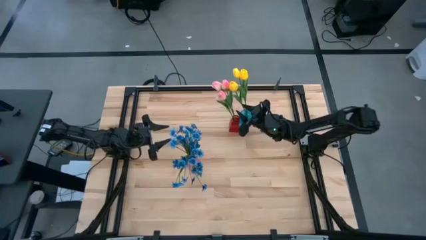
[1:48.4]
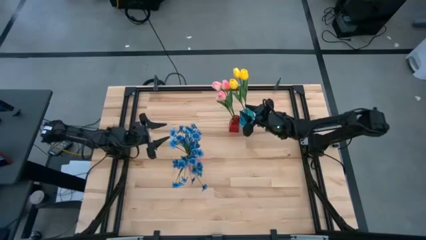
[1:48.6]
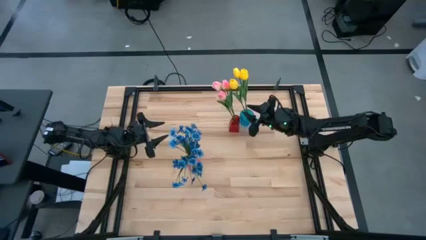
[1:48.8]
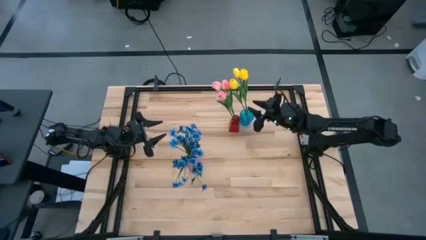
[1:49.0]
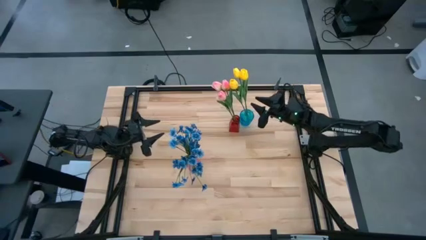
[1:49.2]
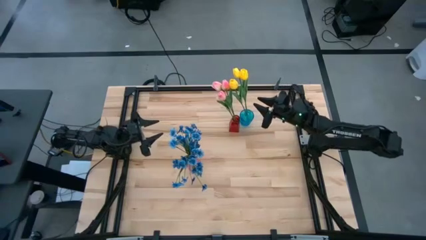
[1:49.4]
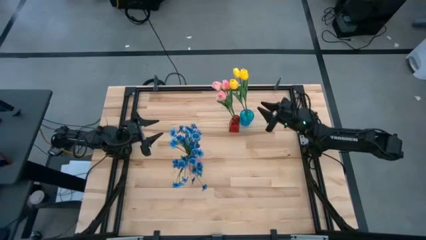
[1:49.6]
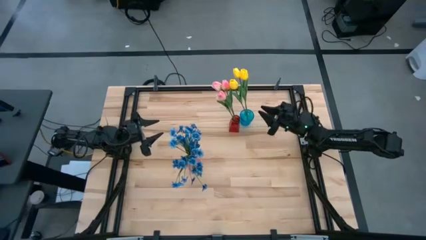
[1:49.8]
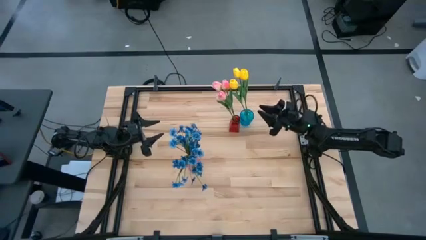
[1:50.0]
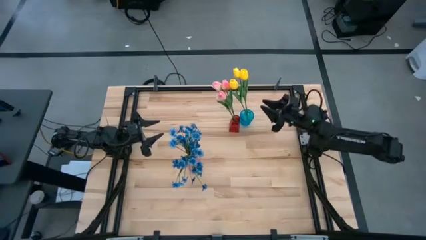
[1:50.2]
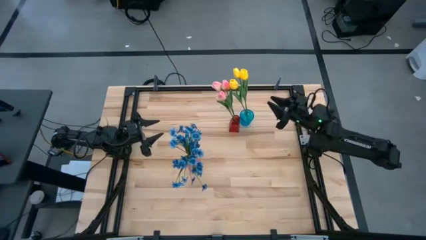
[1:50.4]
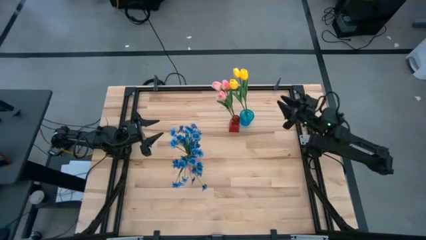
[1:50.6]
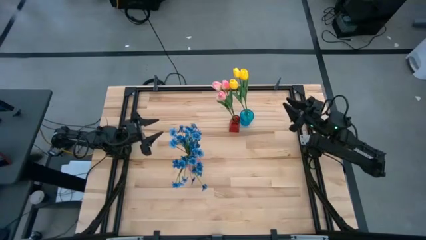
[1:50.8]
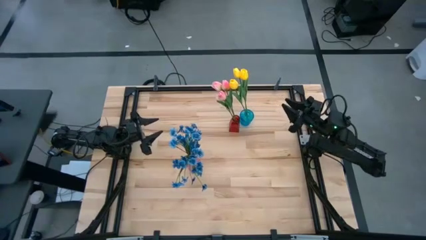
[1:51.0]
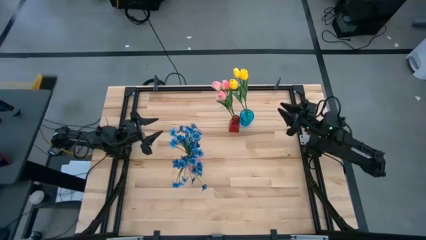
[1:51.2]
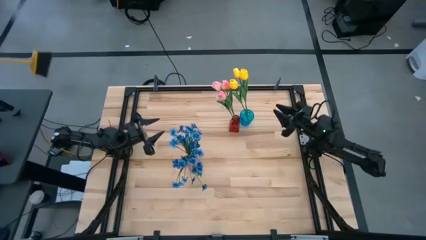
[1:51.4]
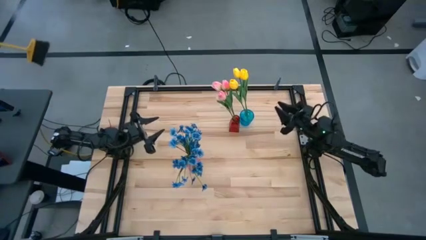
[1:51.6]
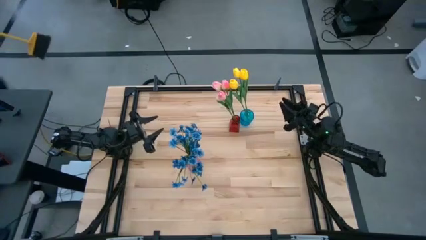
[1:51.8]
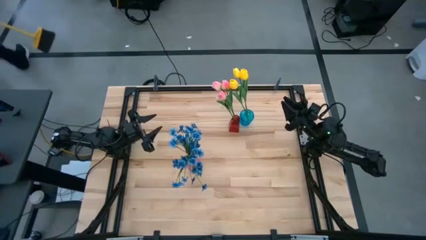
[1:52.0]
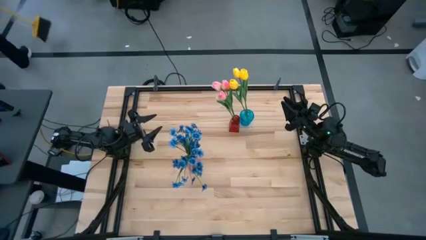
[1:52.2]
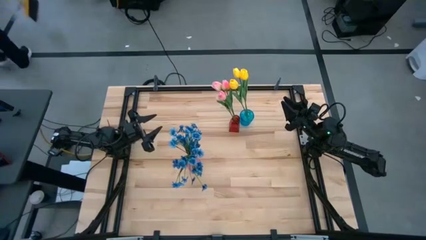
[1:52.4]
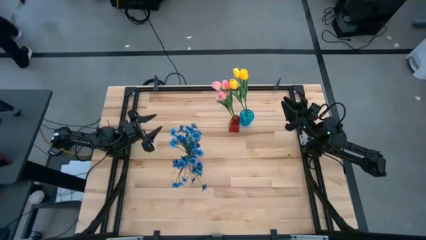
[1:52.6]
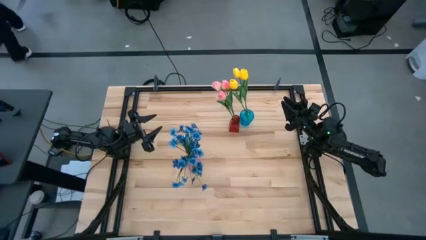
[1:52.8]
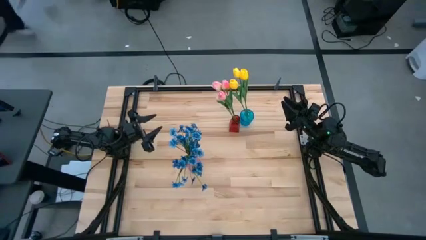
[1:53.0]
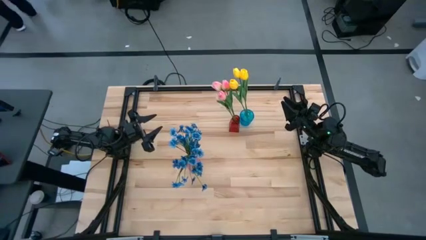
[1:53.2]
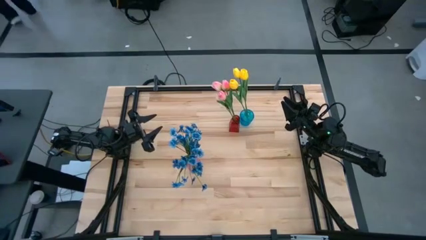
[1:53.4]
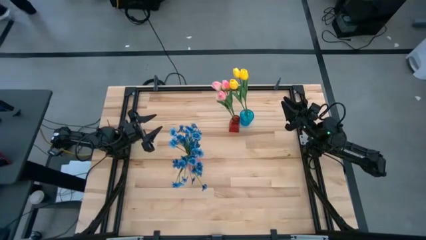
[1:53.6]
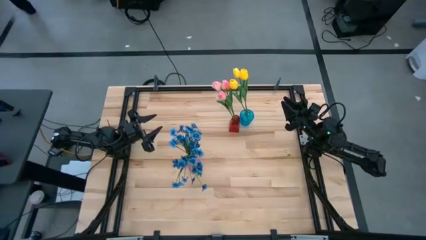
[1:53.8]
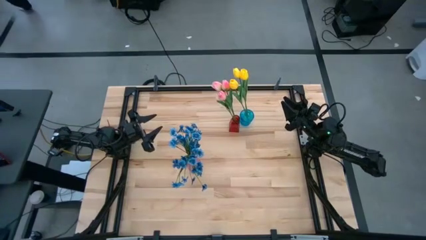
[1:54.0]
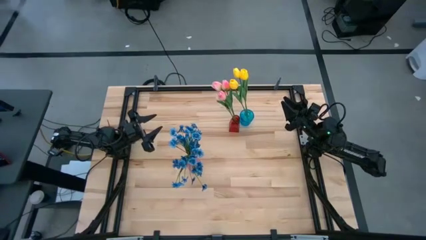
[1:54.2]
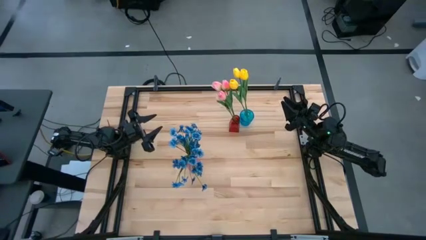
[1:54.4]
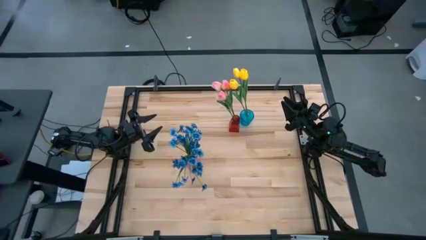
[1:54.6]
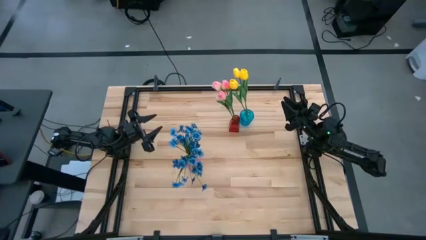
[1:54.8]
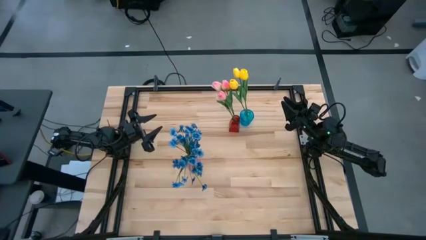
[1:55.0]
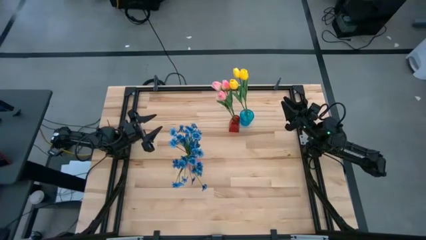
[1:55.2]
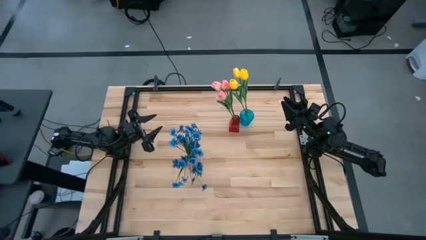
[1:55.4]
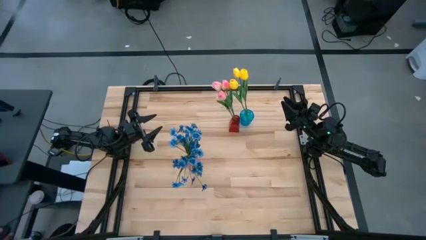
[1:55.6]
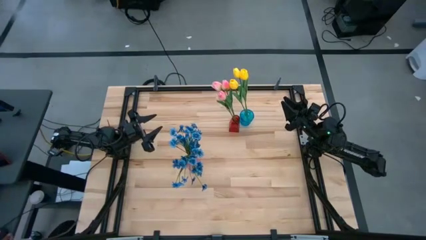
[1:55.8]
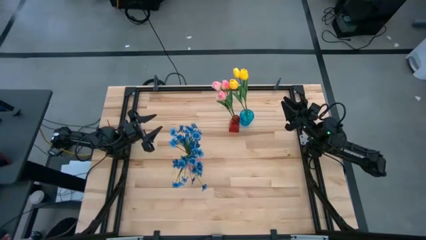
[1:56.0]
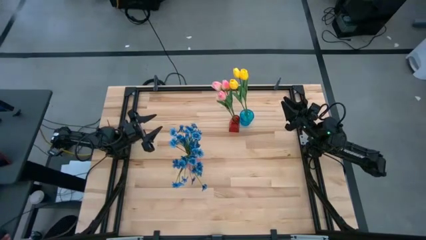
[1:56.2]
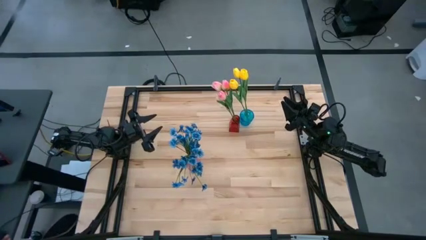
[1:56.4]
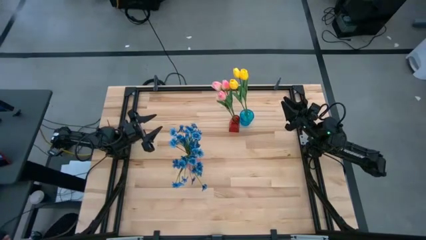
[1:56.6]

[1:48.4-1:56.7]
Task: Sort flowers into vase by color
Return to Home Position

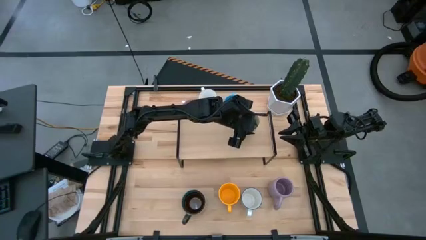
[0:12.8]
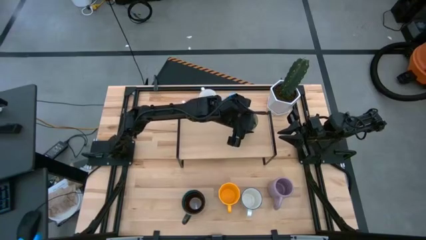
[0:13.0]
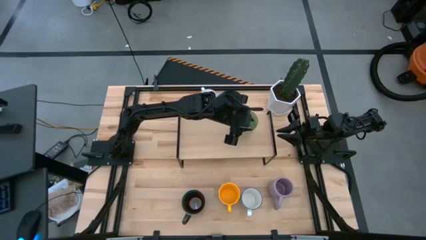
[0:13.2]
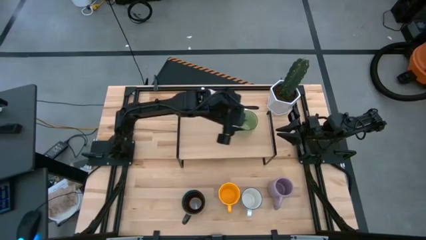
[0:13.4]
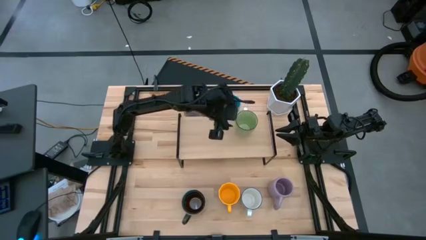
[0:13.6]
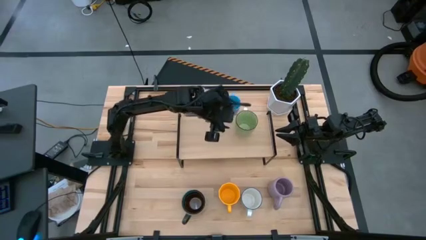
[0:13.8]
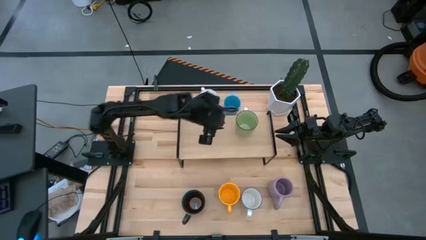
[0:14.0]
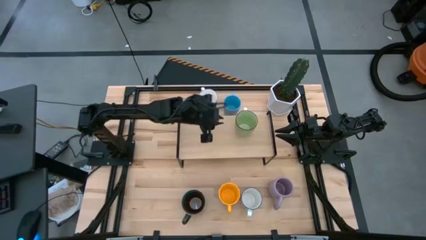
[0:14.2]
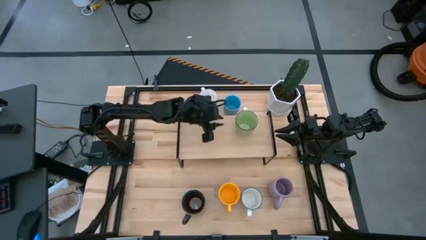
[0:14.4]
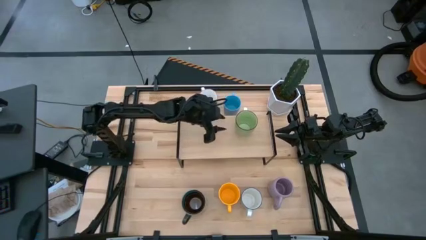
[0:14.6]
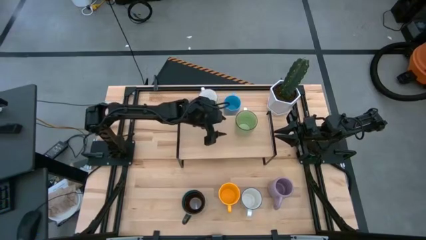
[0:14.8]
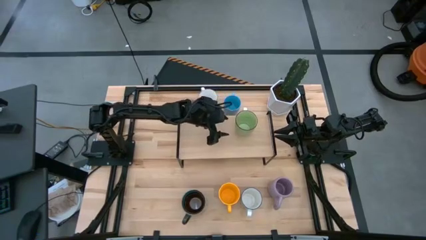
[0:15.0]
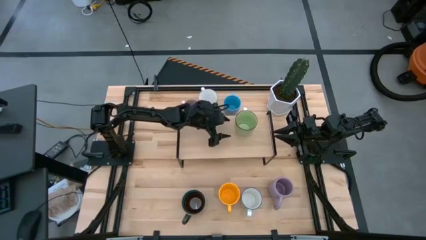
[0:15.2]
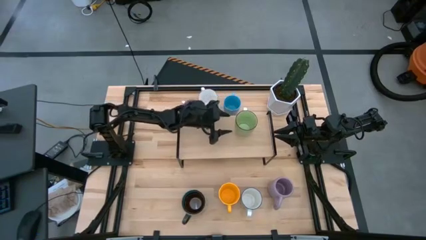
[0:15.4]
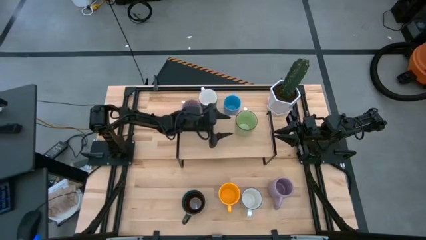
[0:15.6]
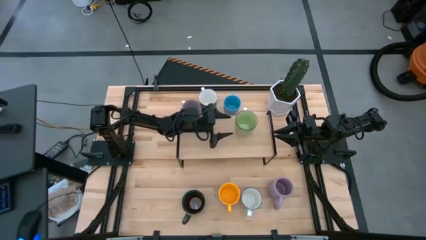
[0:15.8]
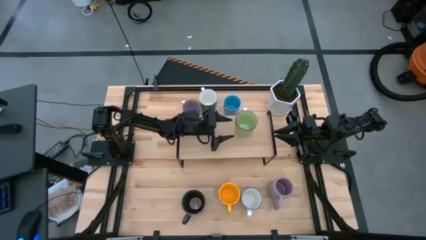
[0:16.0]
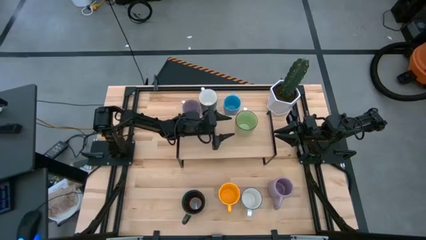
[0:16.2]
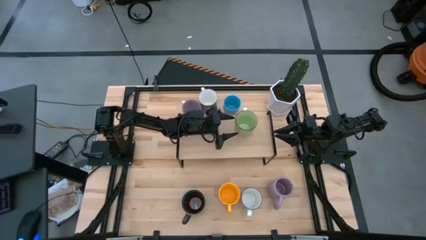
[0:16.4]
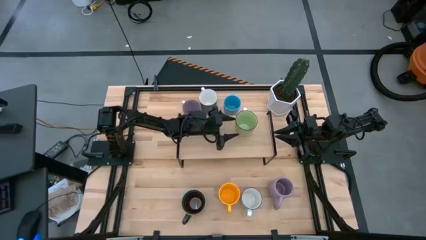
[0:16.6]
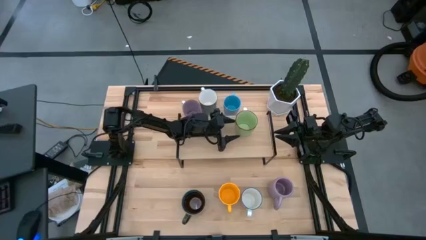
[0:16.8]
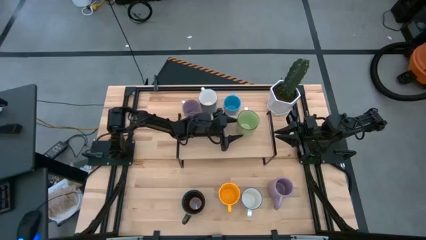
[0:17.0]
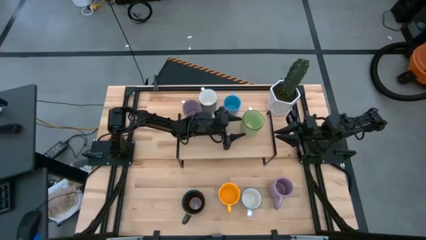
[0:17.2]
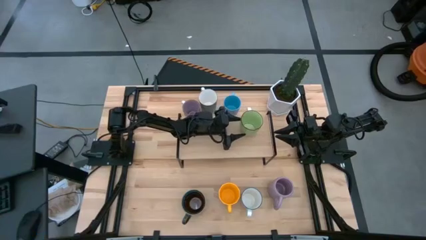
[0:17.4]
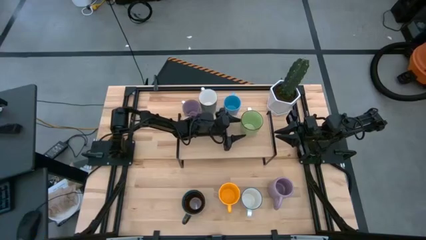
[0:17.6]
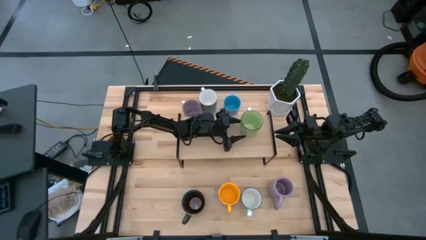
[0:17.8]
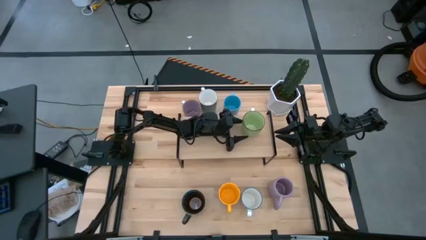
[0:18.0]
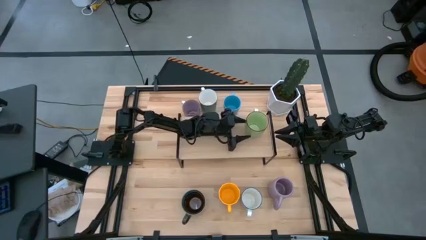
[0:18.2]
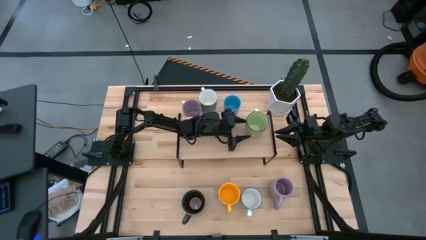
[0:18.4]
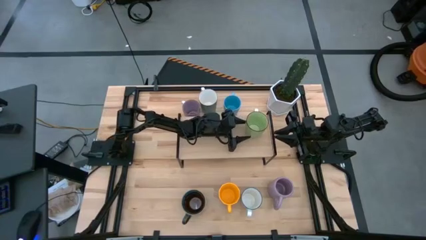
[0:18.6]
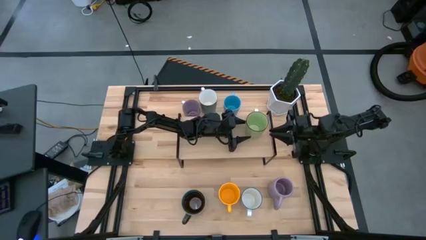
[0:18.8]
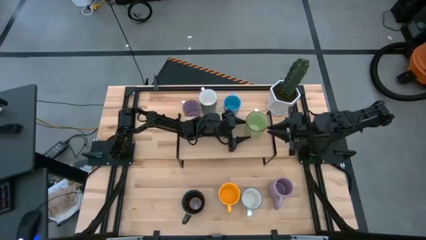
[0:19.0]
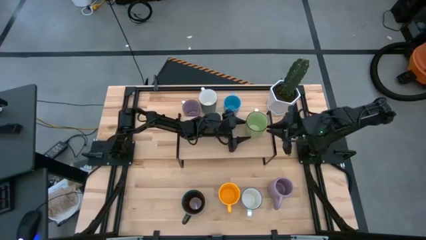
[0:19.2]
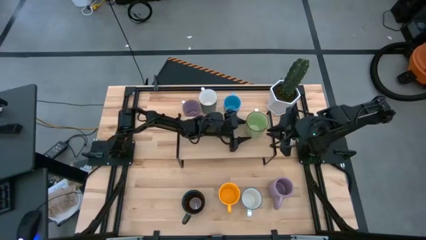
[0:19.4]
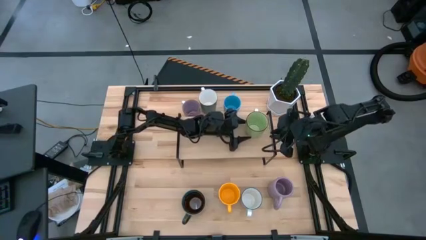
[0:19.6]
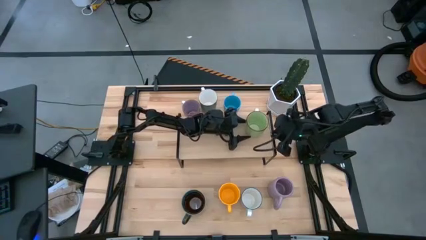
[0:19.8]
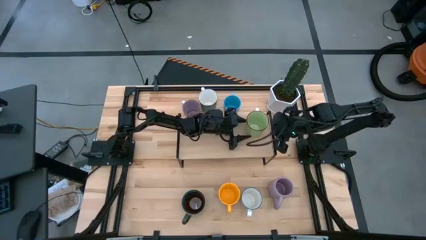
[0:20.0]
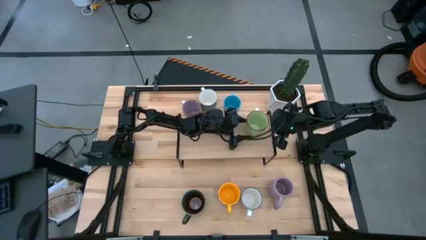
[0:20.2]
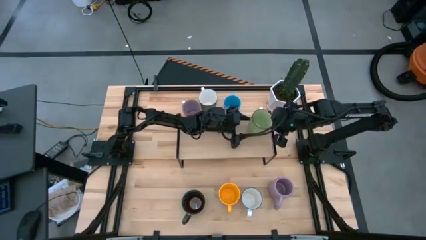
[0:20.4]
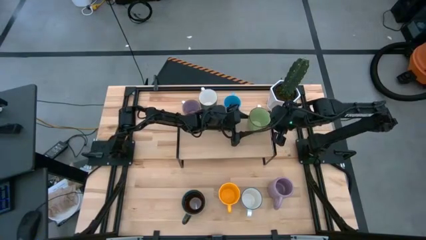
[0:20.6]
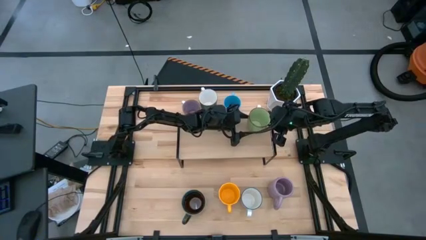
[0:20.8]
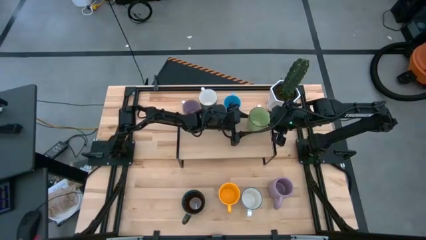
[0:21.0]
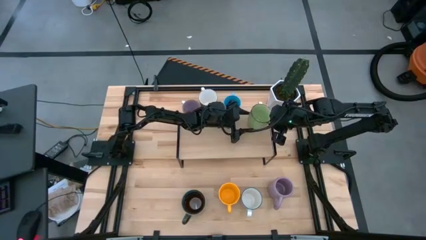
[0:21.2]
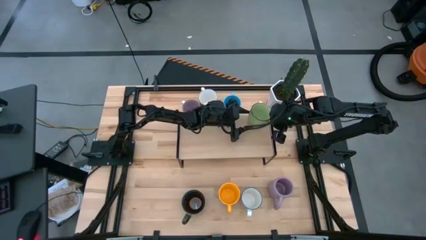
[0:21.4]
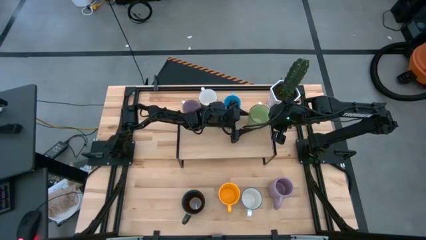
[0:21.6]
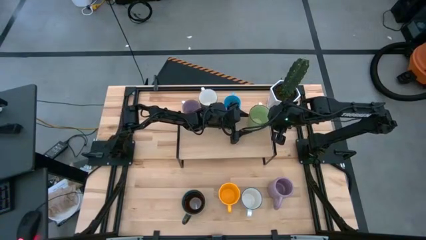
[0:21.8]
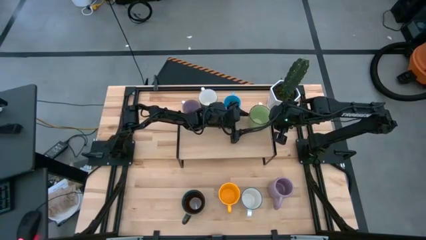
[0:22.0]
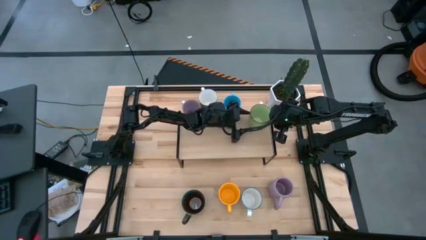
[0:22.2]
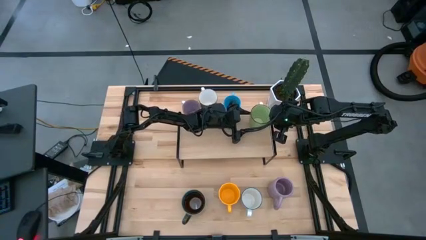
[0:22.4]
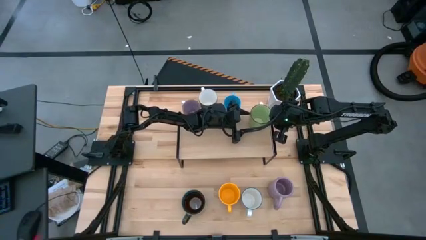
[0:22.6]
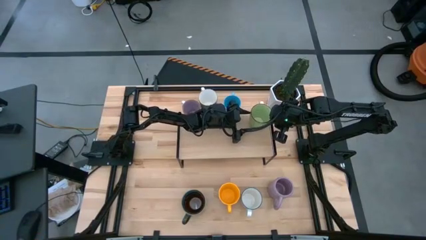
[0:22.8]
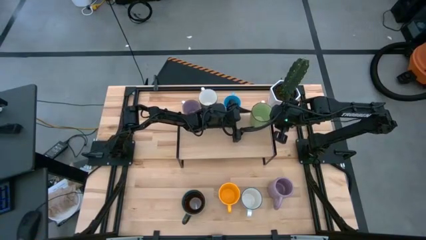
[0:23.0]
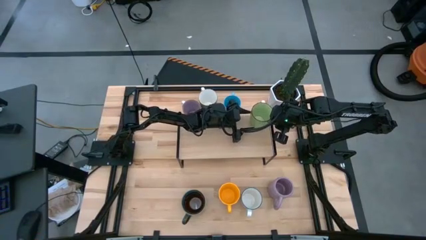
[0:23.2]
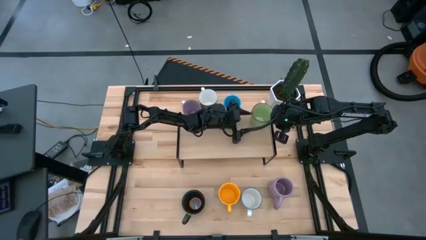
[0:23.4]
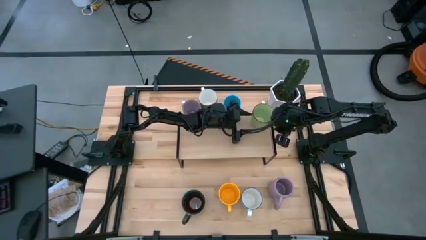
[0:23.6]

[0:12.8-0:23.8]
Task: Place coffee mugs
Put the green mug on the shelf
